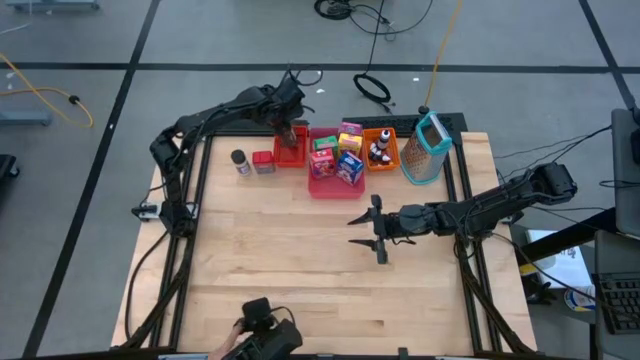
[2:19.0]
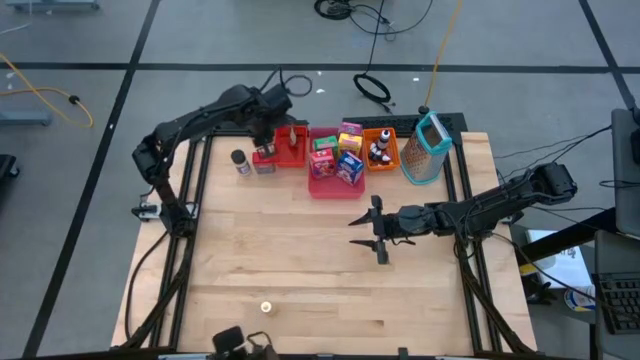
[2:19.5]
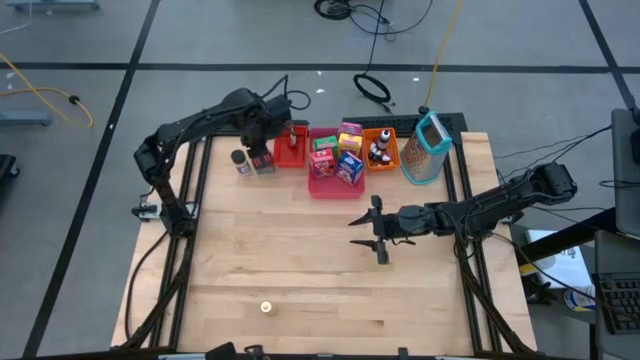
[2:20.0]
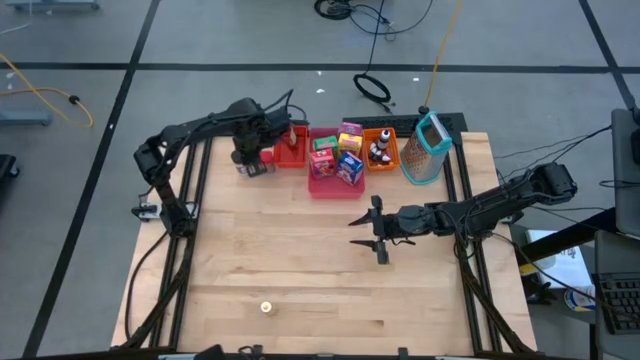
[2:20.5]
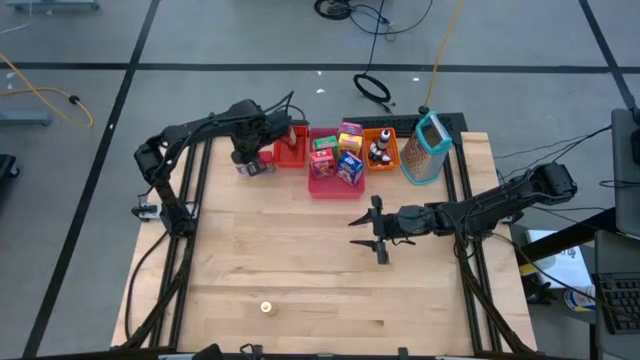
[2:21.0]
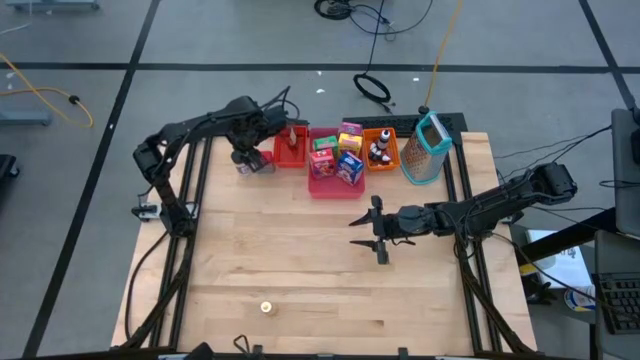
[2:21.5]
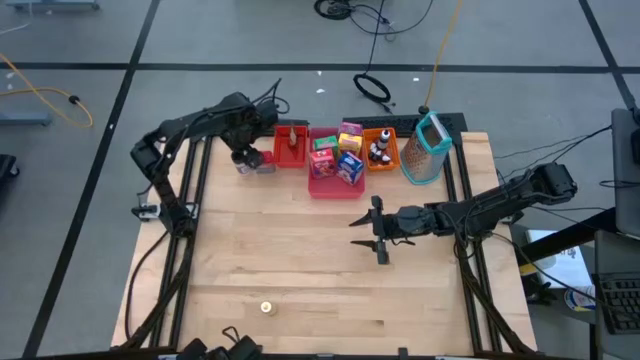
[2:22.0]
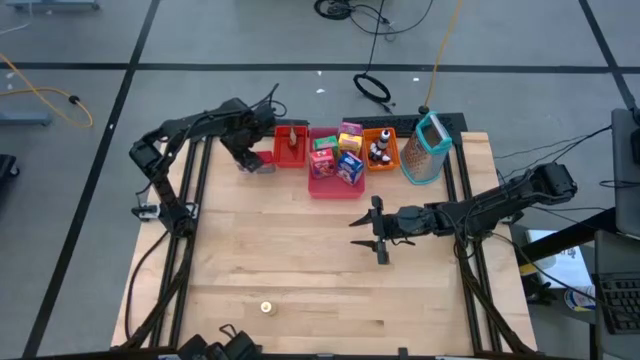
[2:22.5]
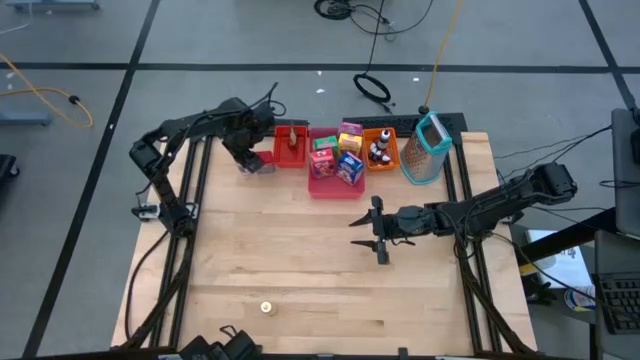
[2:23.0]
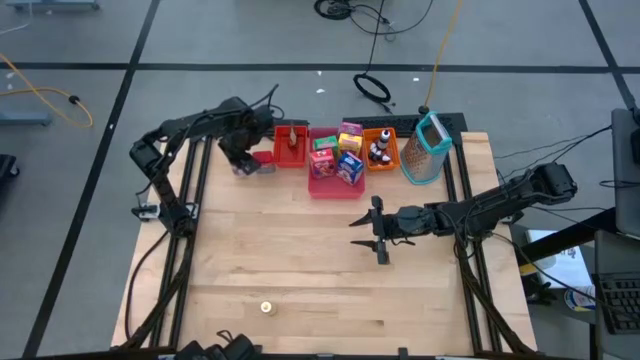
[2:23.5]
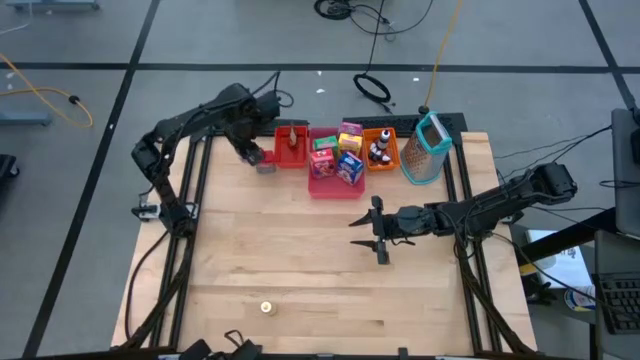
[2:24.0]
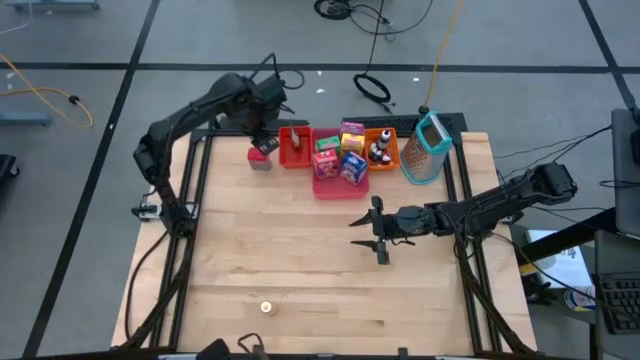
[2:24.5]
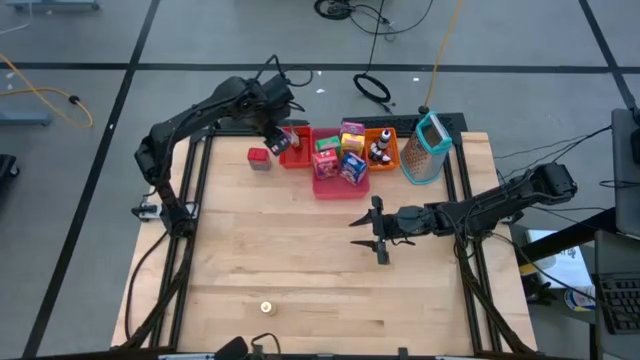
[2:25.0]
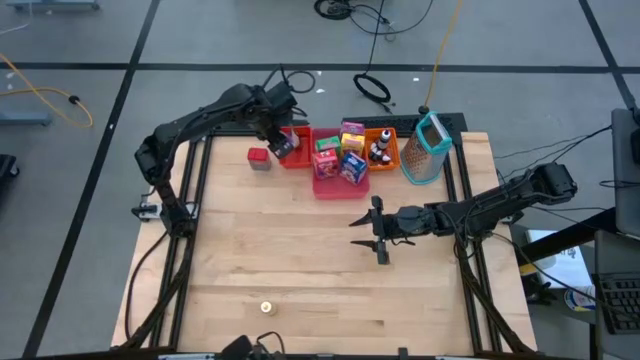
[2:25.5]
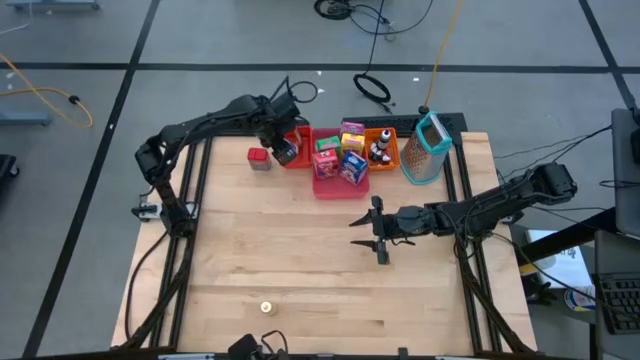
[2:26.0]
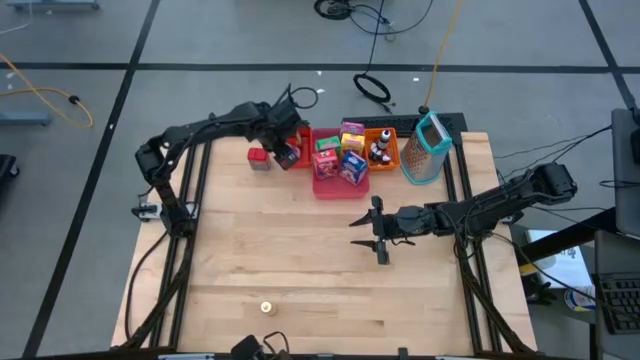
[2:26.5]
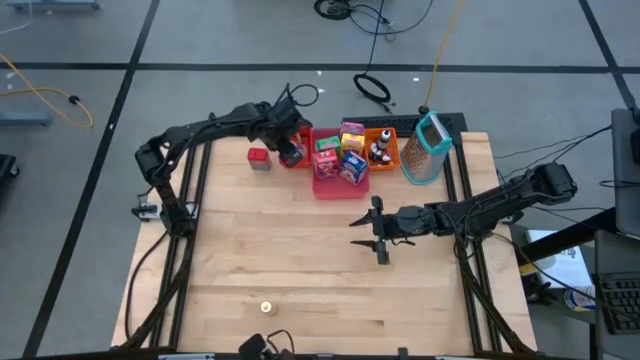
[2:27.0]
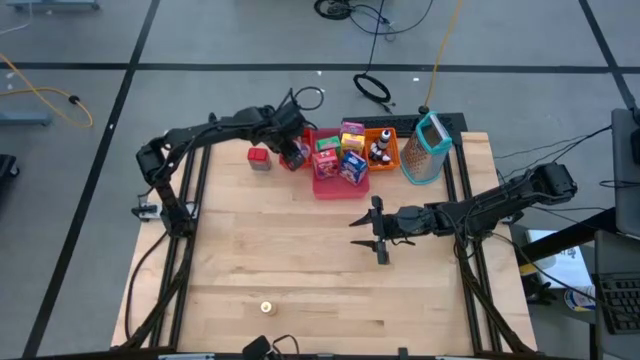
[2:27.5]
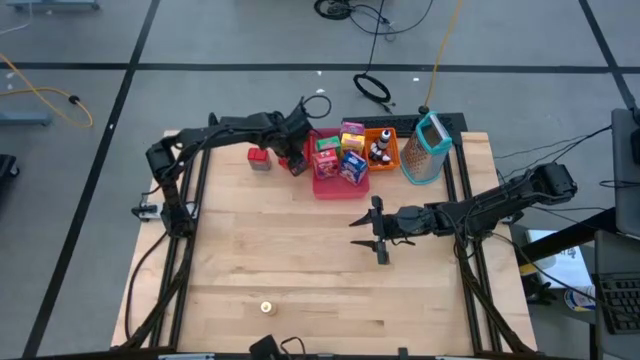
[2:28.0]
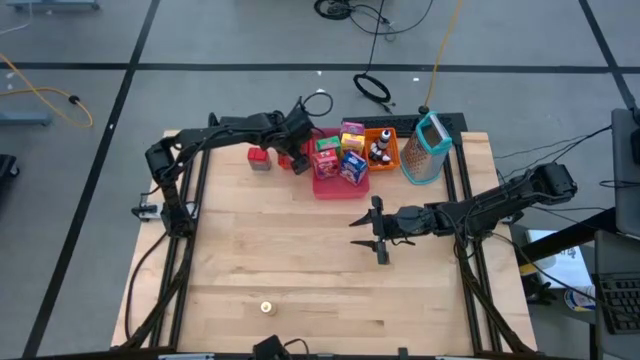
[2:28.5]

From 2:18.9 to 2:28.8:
Task: Pick & Place Kitchen Items
Put the black seasoning bottle into the red bin

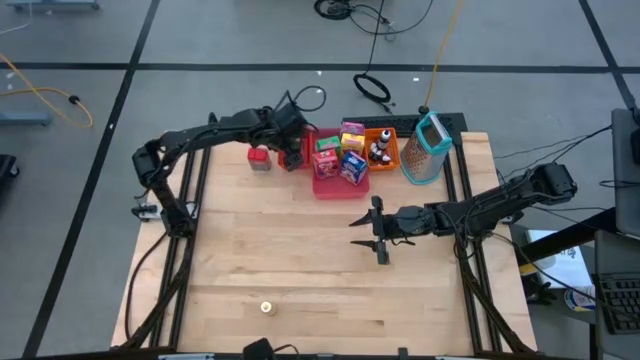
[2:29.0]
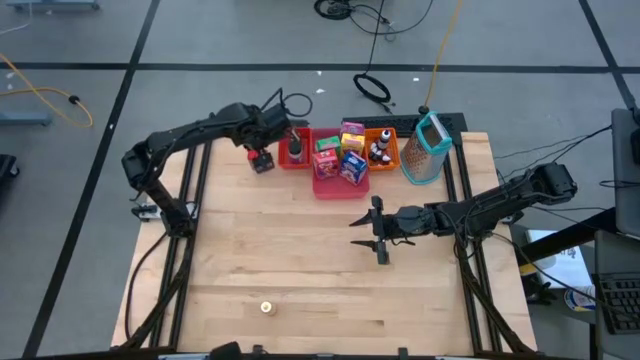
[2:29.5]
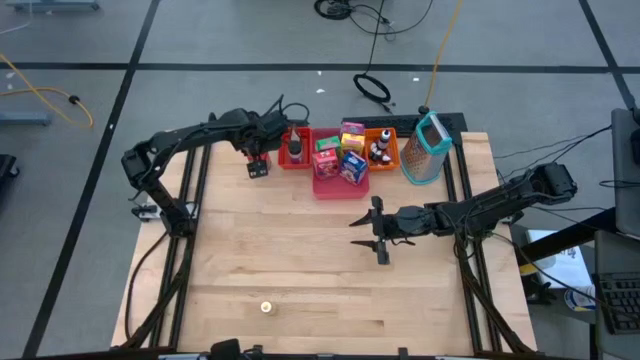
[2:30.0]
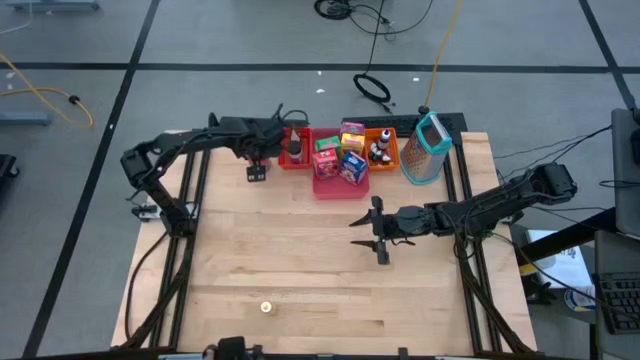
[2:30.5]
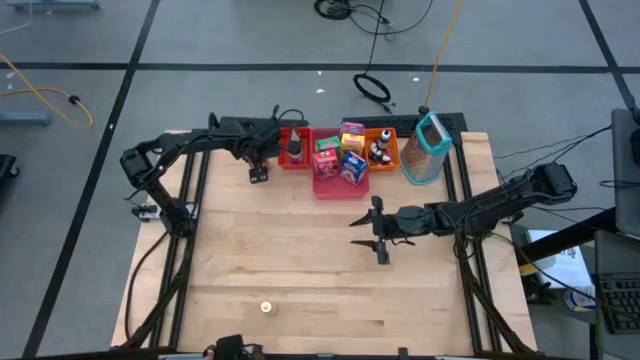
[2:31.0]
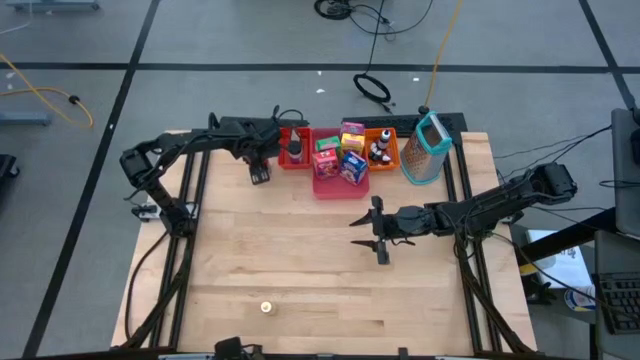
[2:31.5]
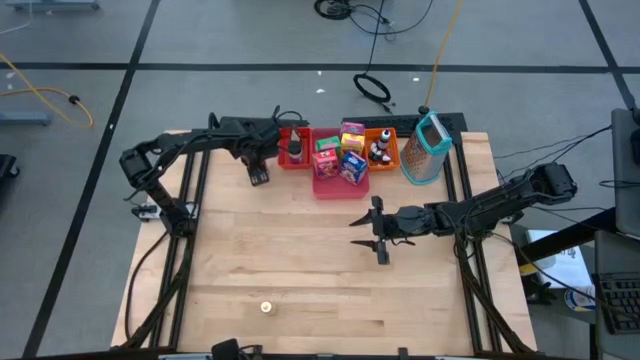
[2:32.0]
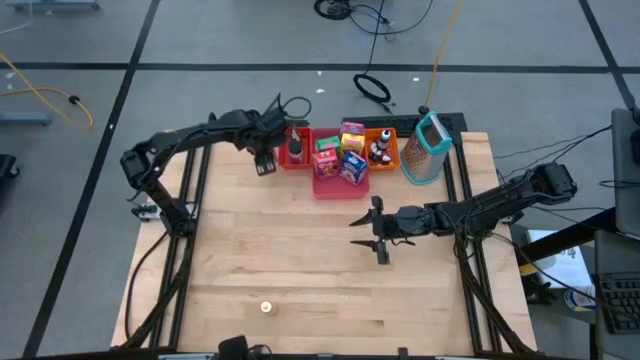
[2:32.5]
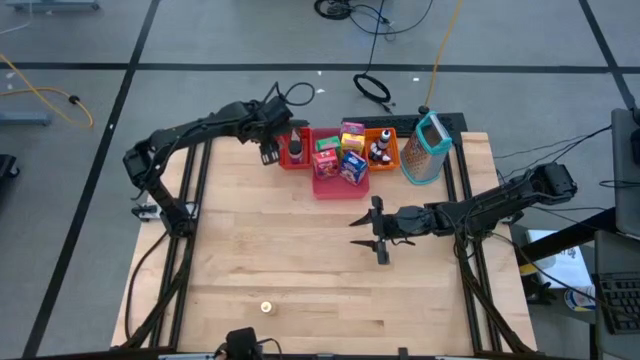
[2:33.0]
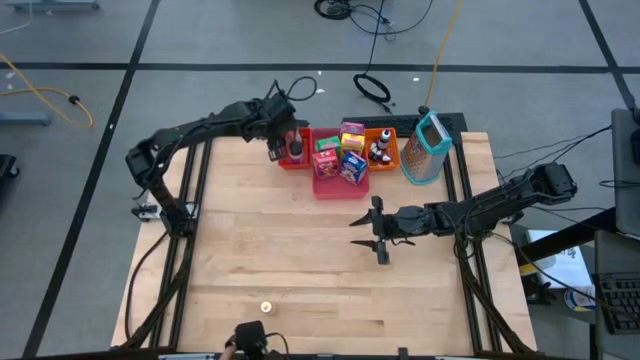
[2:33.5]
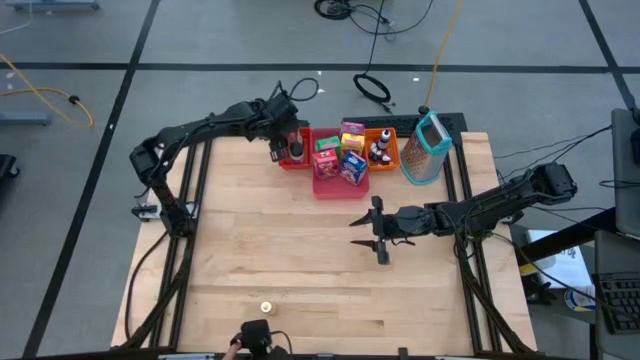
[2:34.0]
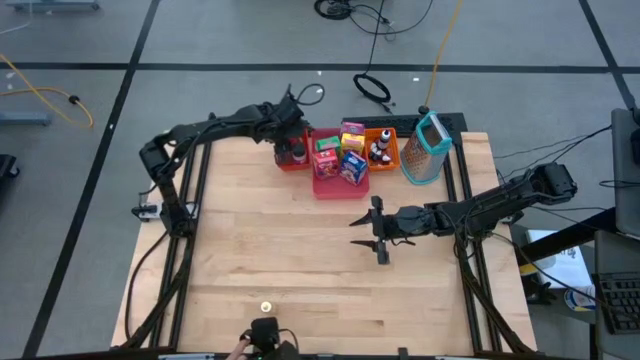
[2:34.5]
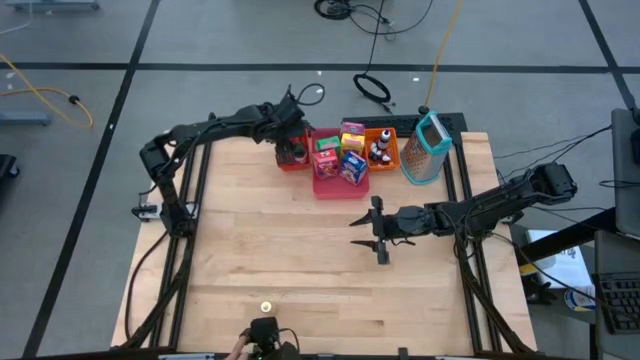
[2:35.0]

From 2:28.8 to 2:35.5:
Put the red seasoning can into the red bin

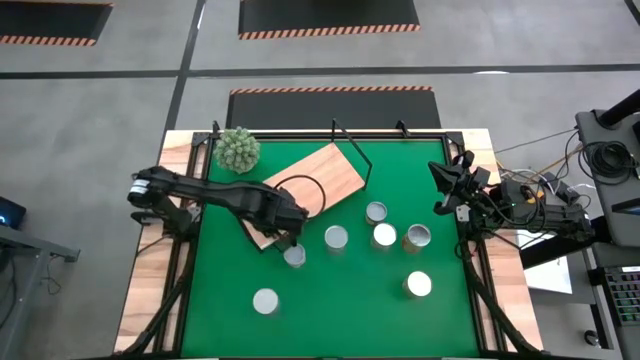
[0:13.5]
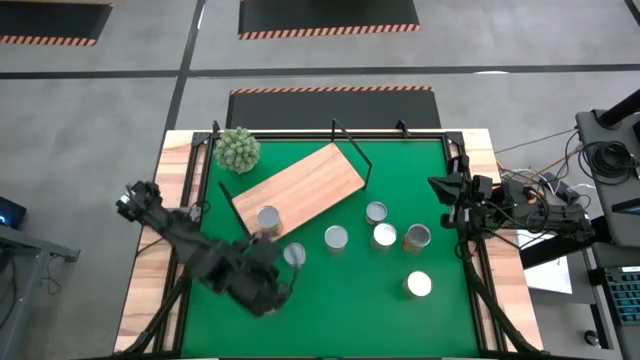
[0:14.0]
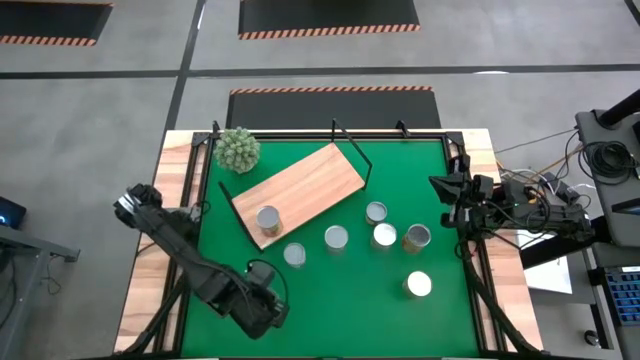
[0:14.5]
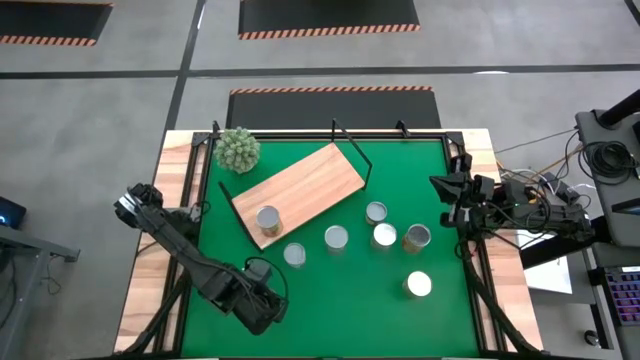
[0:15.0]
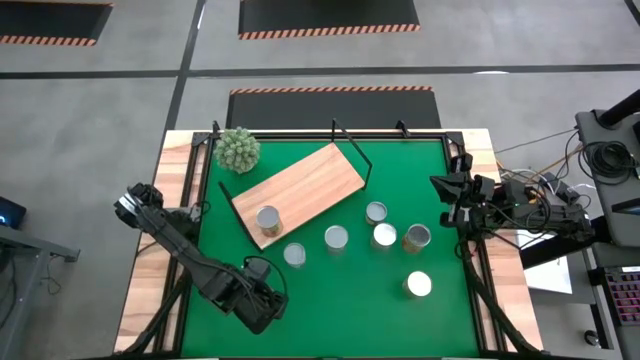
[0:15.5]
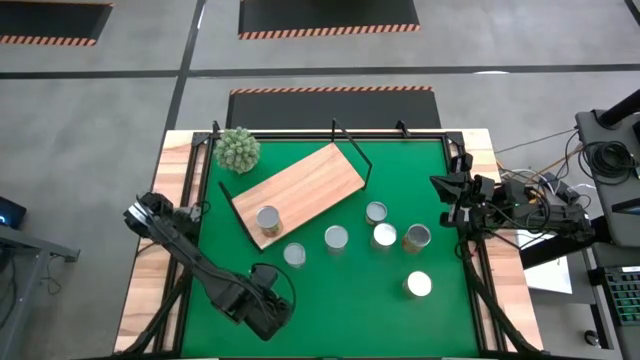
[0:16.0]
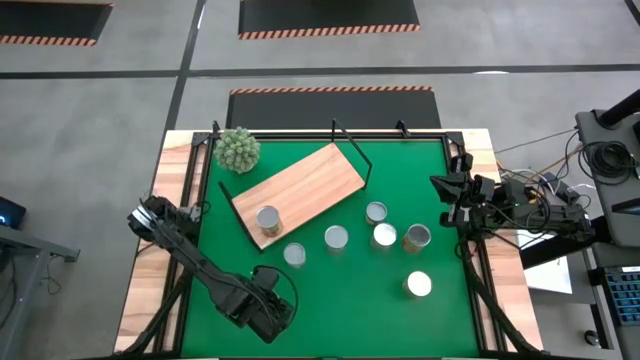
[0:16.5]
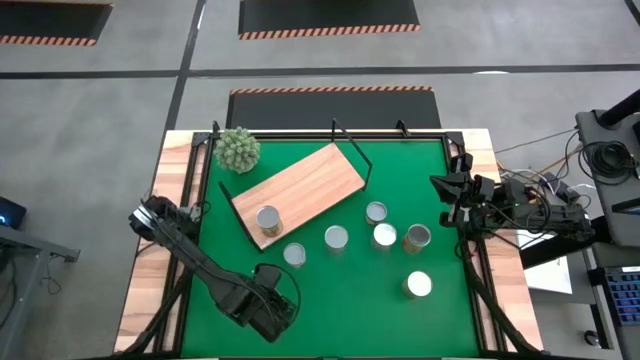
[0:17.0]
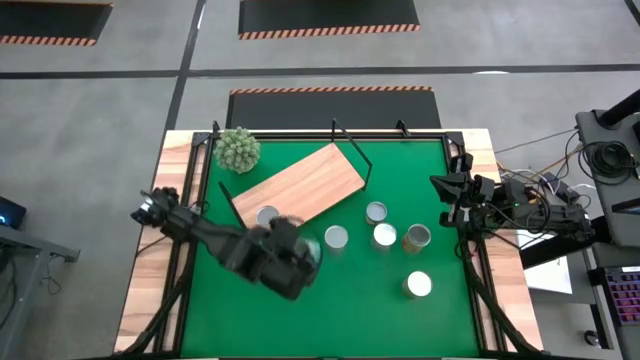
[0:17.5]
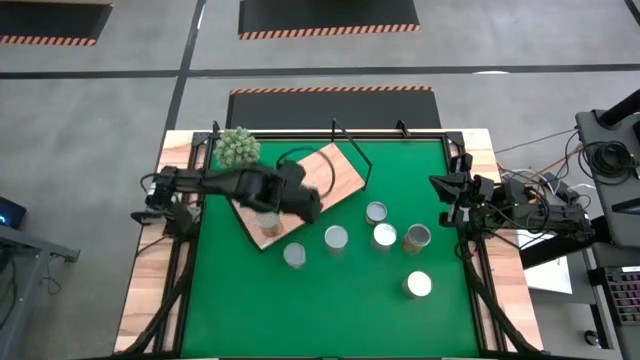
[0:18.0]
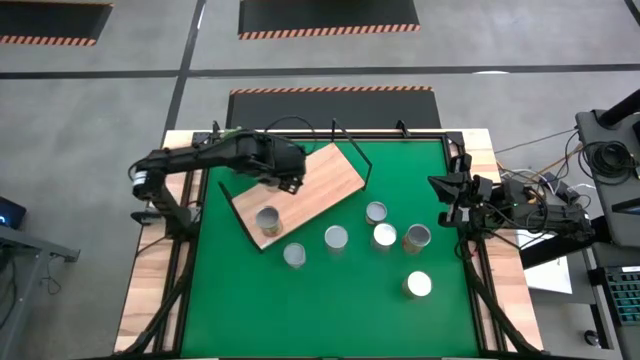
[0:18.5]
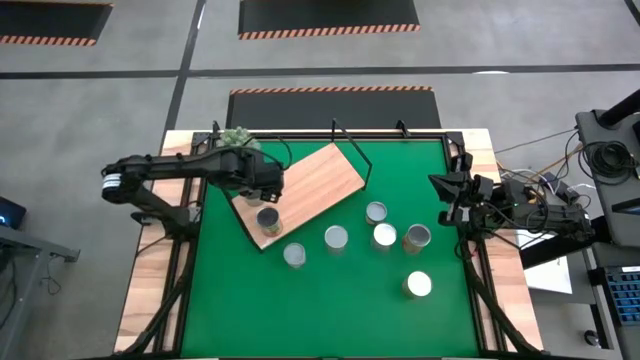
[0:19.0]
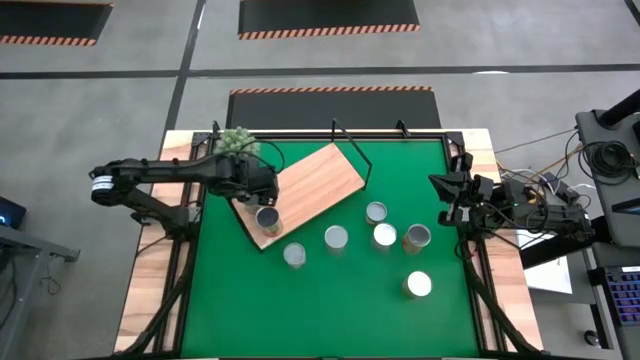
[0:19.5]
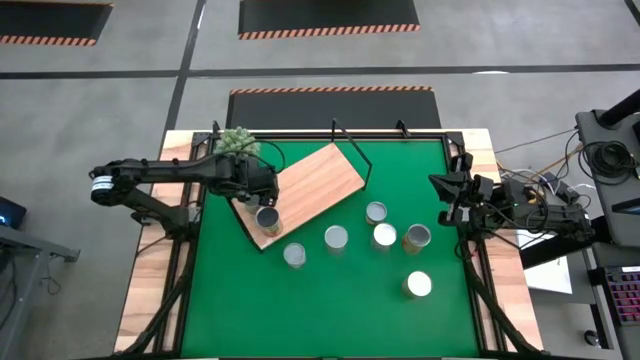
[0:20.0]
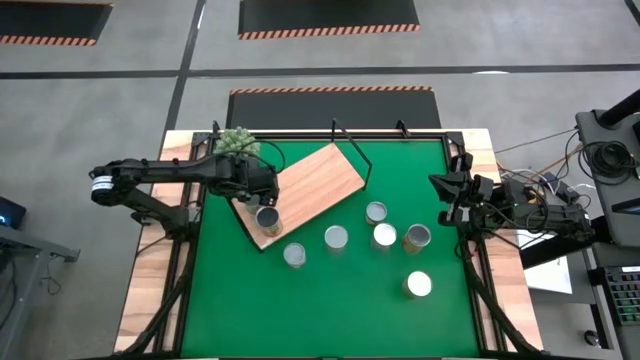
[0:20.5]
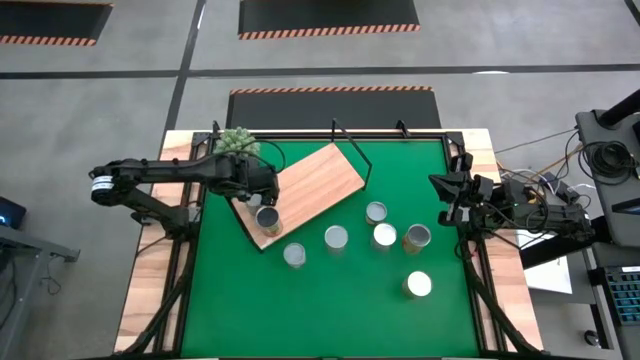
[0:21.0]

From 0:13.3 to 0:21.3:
Task: Pick and place cans onto a shelf
Put the bottom canned cherries on the shelf
